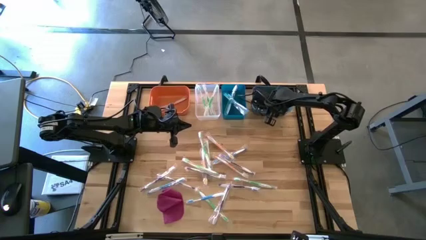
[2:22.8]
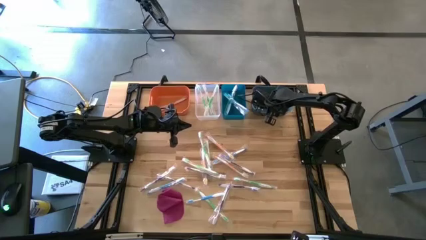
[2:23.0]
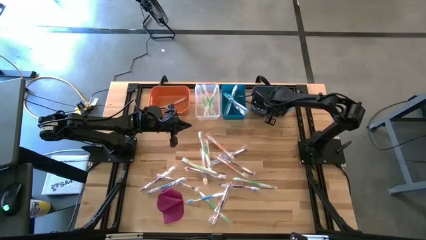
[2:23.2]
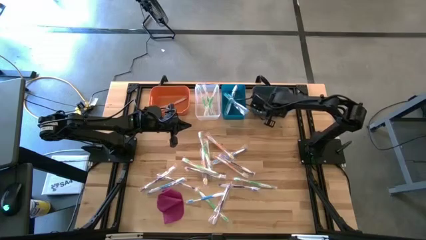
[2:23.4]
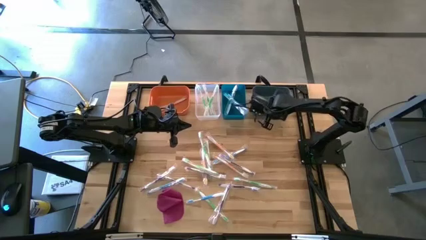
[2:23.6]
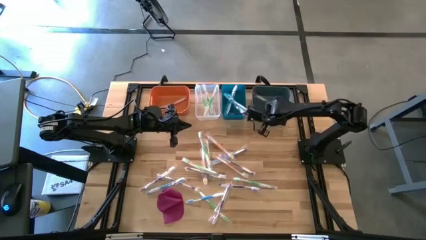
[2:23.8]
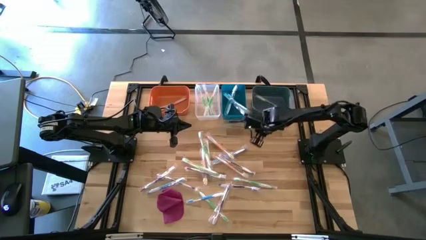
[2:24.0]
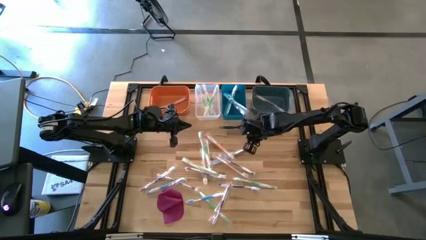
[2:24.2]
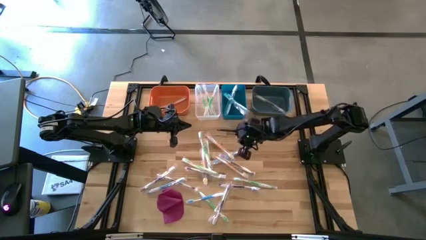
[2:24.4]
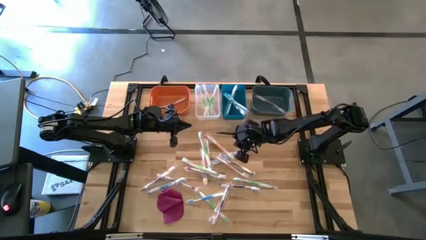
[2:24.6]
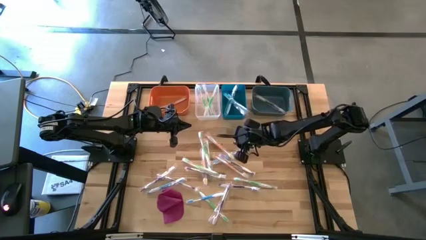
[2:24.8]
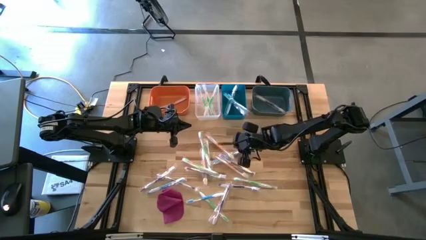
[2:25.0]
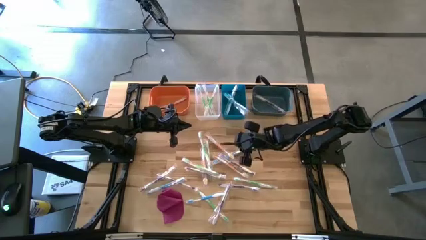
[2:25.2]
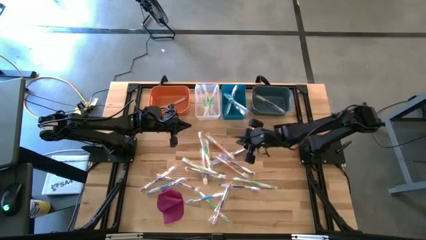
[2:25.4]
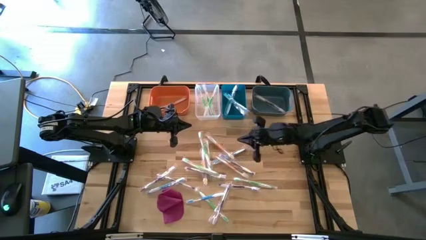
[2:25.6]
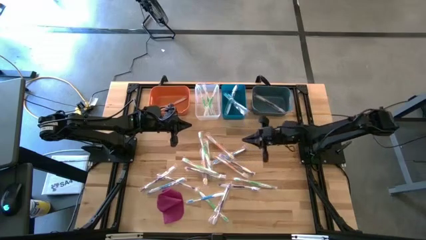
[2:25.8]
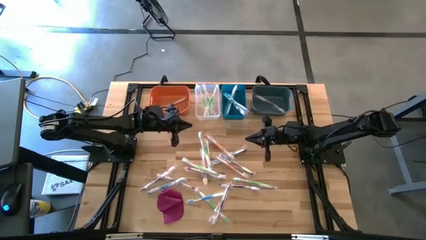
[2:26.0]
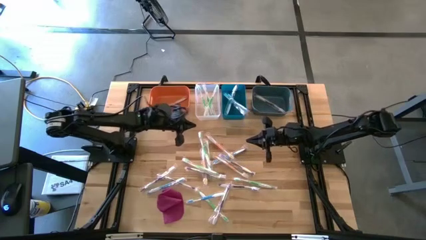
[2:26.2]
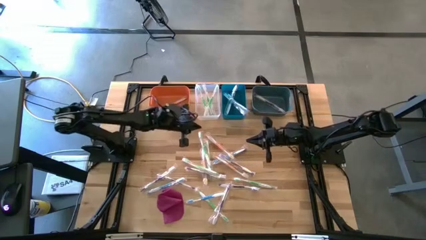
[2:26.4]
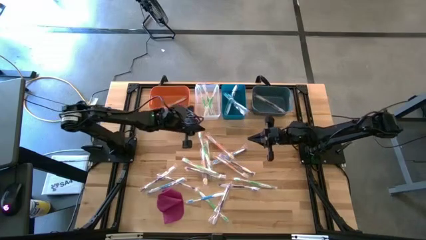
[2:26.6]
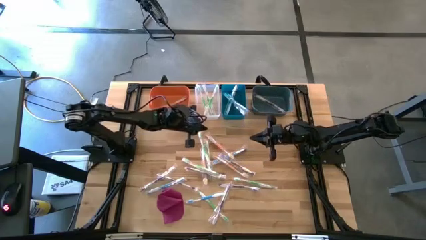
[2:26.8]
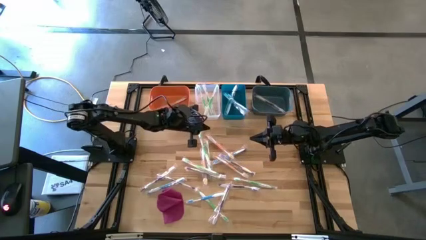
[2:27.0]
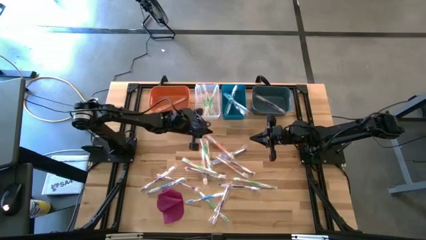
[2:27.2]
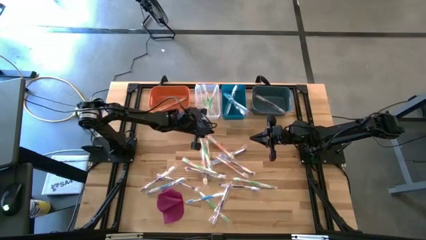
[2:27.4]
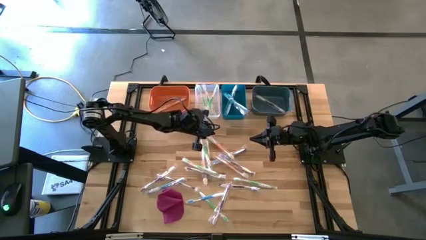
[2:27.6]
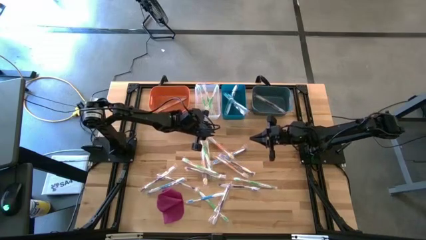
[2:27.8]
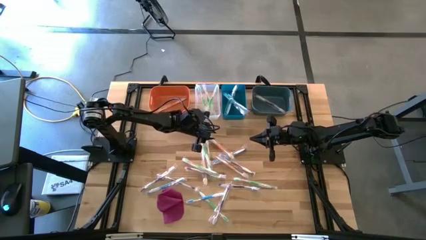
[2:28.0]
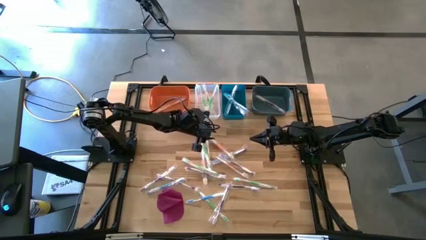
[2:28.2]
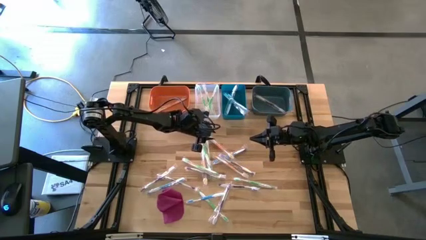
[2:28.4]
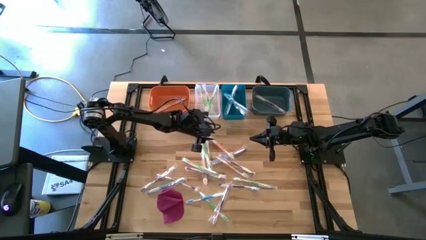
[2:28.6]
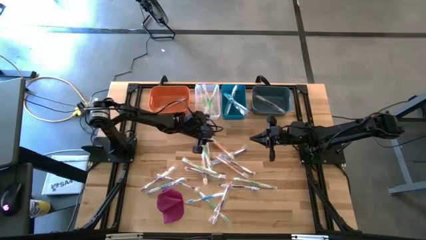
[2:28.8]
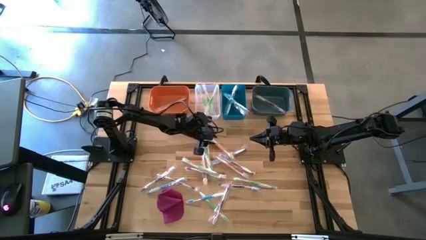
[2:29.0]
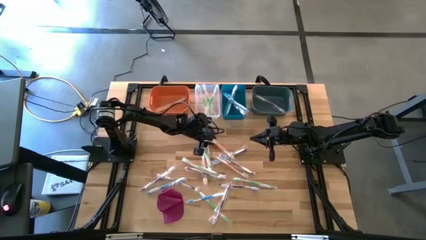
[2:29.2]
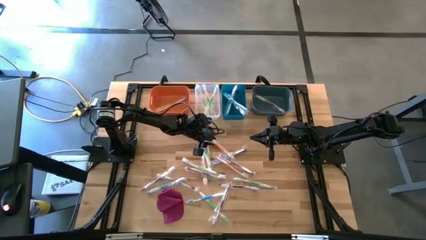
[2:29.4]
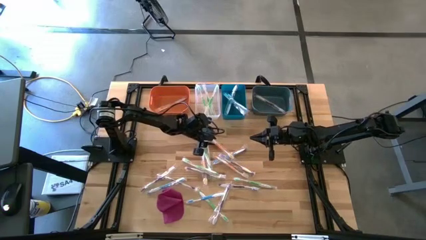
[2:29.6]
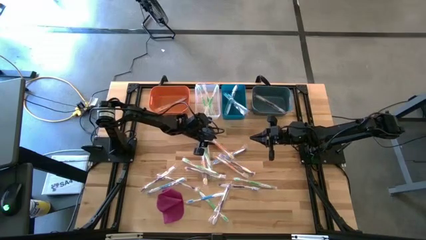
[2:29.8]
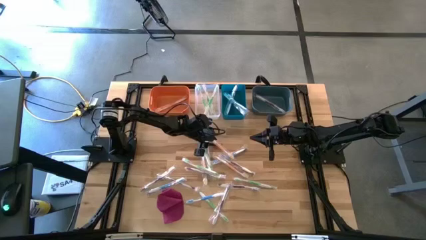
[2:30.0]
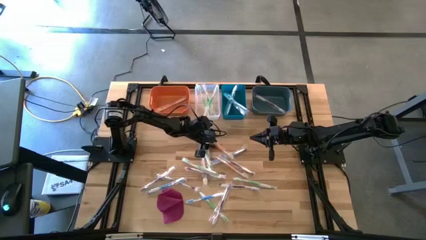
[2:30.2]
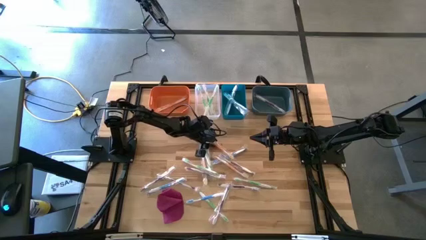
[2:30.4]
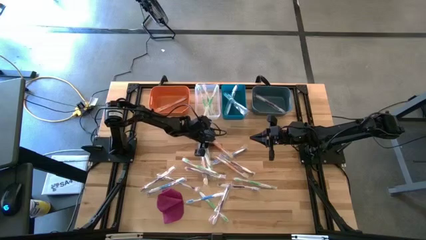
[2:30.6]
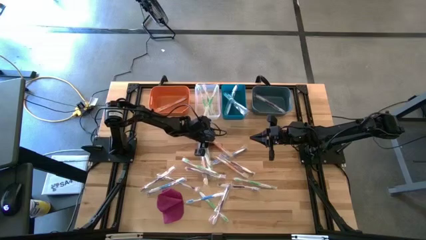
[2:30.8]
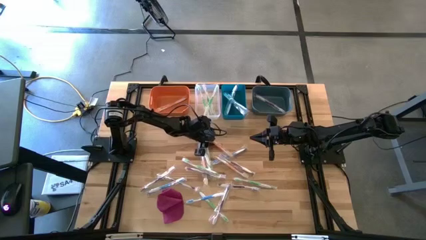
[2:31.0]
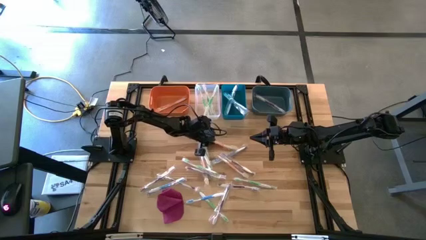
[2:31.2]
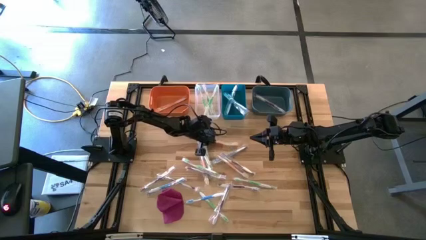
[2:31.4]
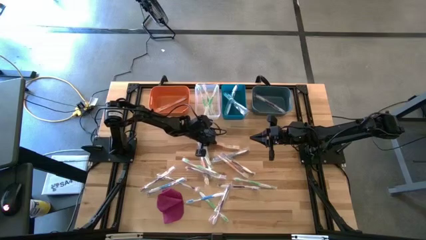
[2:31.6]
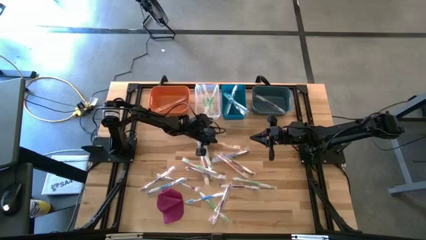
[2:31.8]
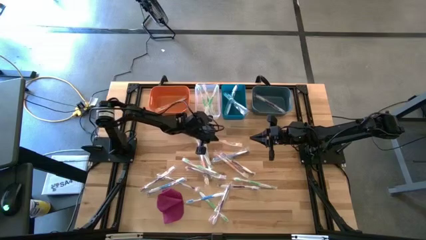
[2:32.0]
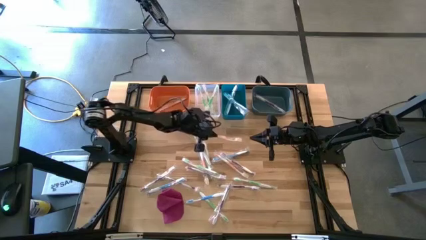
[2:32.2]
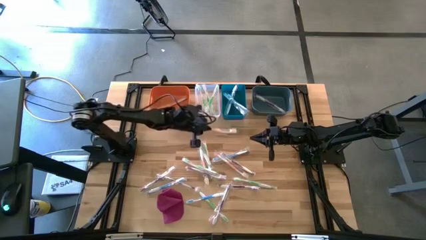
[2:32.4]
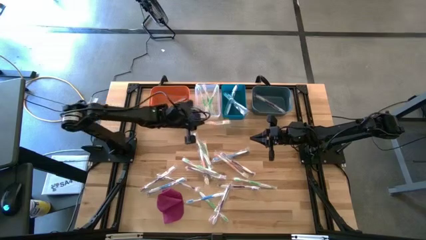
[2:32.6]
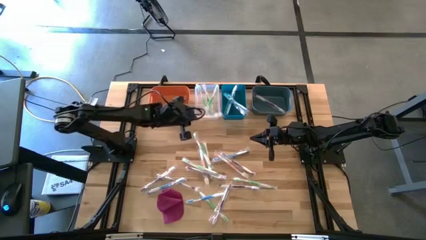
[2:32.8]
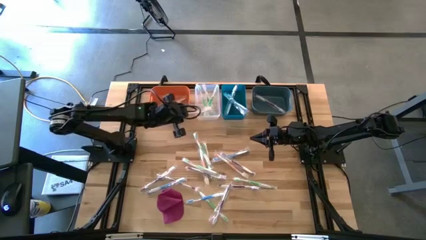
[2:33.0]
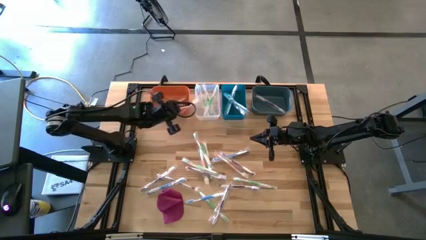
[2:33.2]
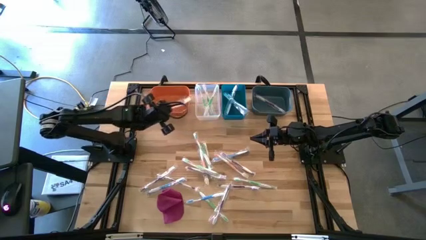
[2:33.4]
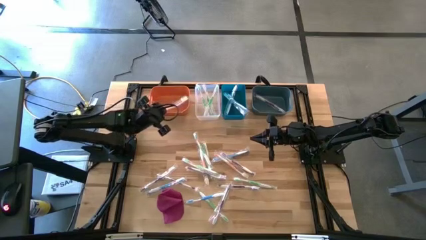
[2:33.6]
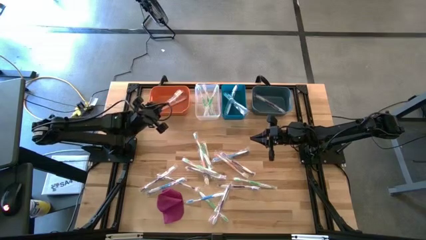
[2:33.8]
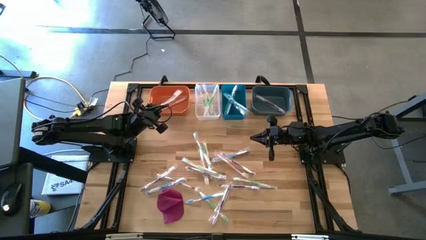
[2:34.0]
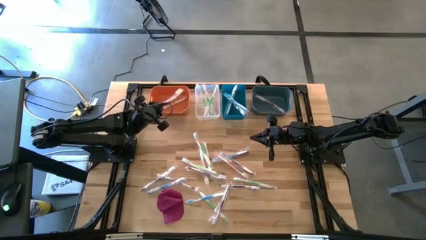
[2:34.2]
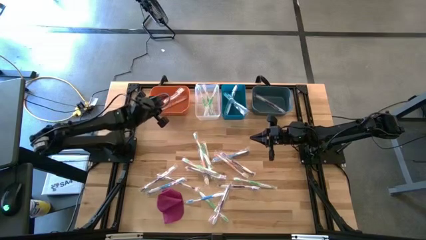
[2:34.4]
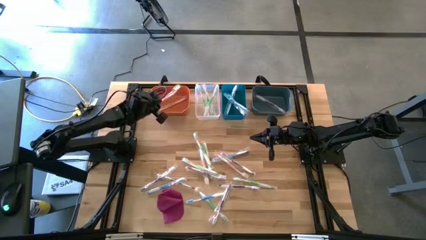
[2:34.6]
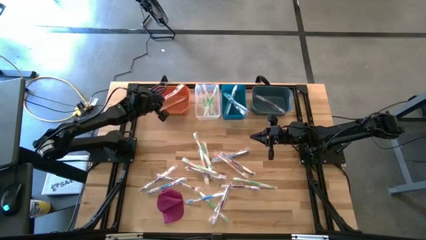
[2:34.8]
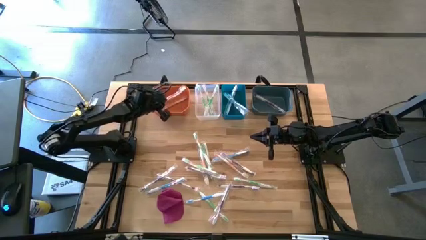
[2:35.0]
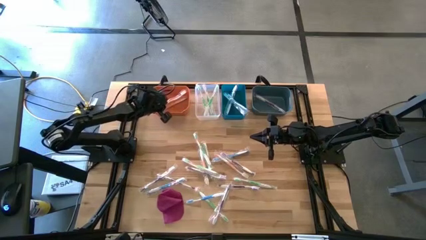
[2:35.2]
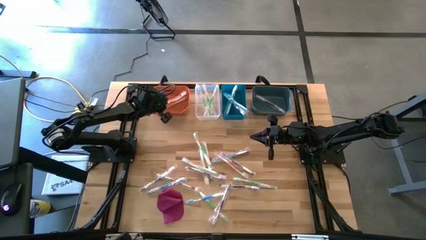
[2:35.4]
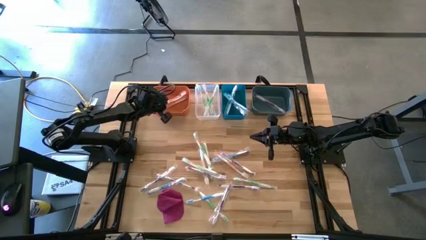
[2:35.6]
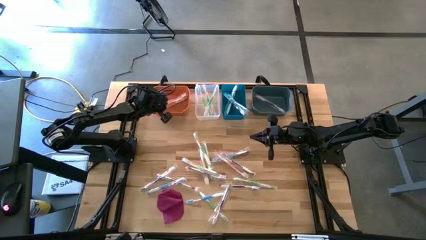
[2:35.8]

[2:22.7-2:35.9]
Task: Pick & Place Toothbrushes
Put the orange toothbrush into the orange bin
